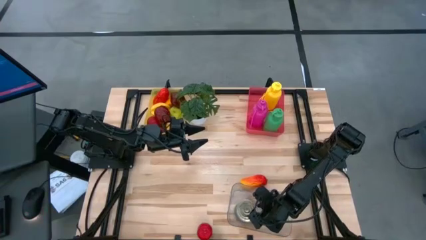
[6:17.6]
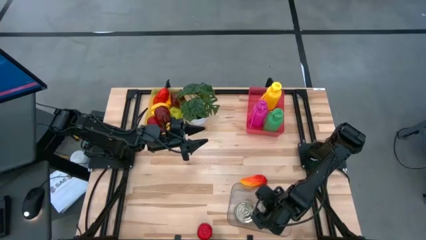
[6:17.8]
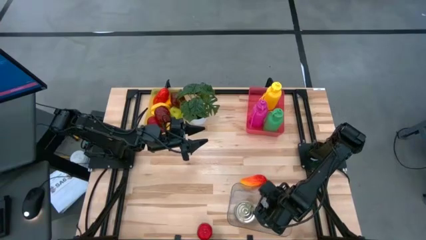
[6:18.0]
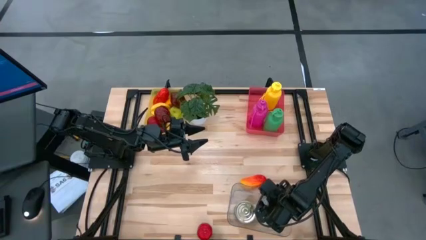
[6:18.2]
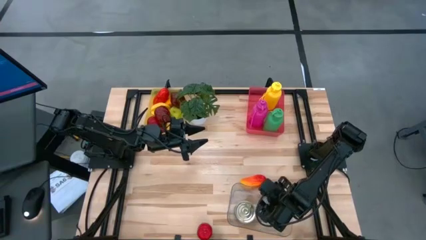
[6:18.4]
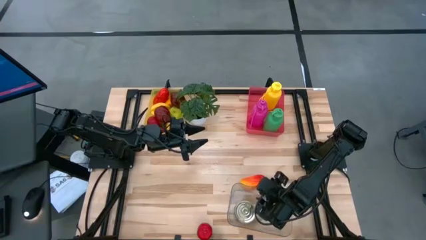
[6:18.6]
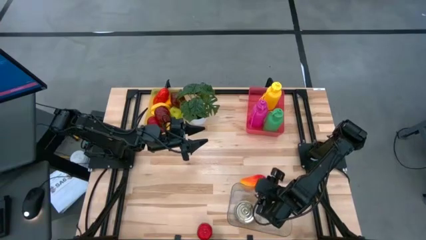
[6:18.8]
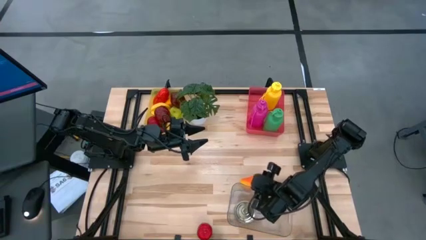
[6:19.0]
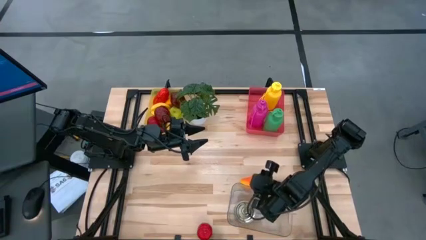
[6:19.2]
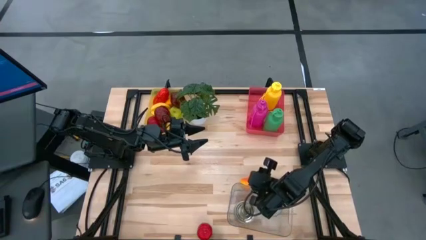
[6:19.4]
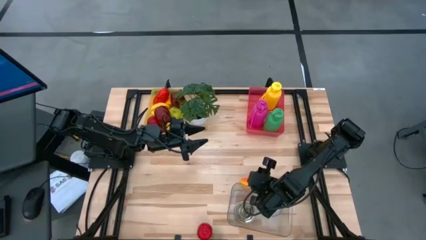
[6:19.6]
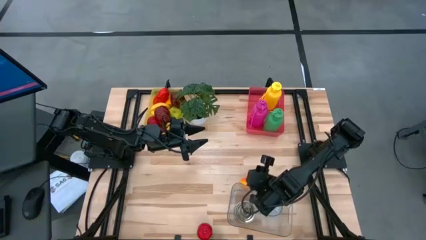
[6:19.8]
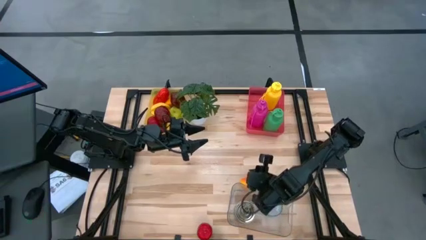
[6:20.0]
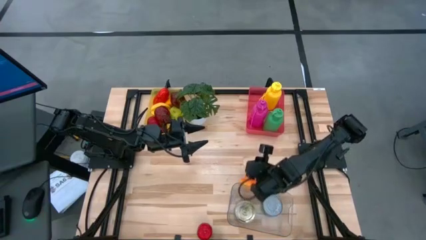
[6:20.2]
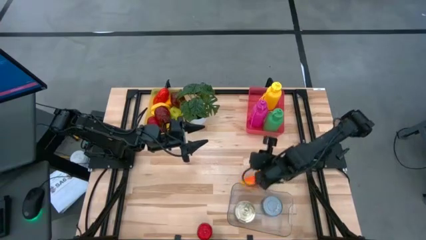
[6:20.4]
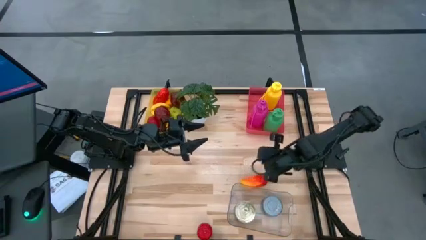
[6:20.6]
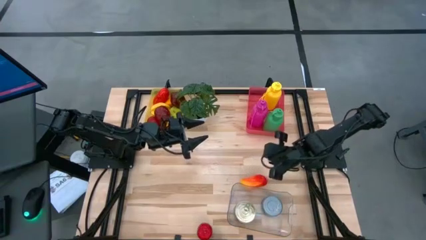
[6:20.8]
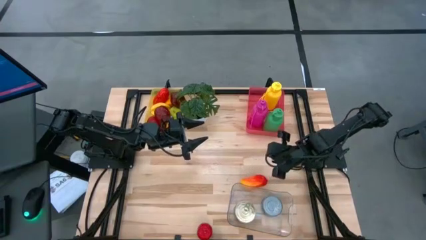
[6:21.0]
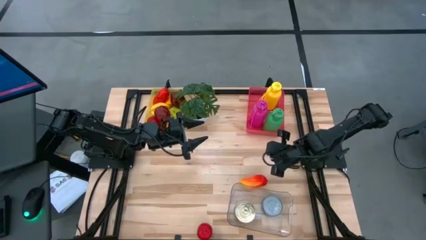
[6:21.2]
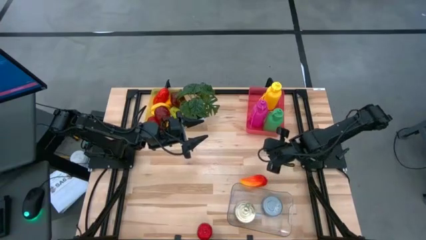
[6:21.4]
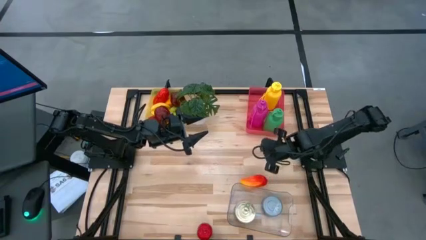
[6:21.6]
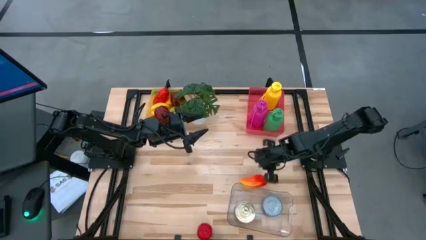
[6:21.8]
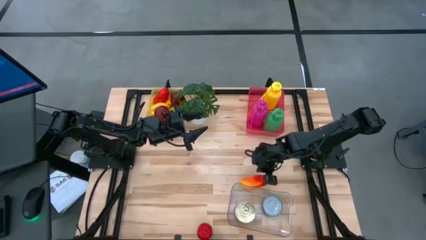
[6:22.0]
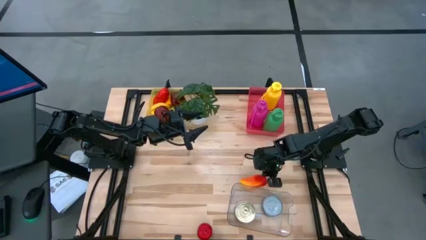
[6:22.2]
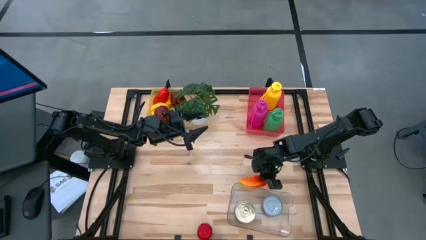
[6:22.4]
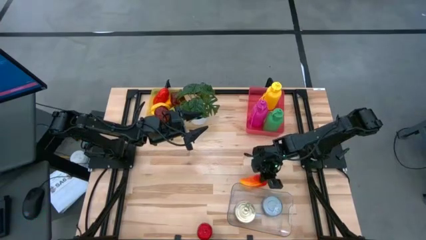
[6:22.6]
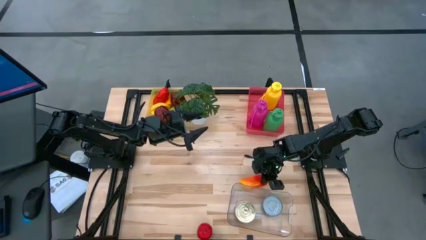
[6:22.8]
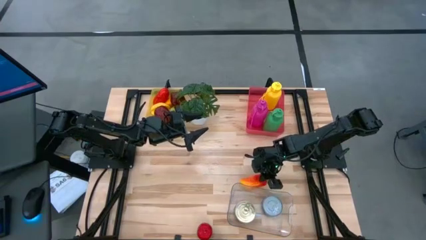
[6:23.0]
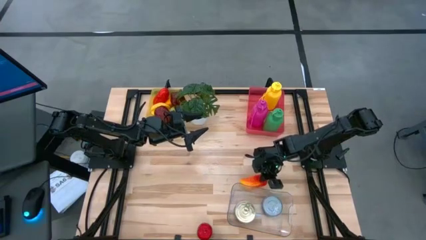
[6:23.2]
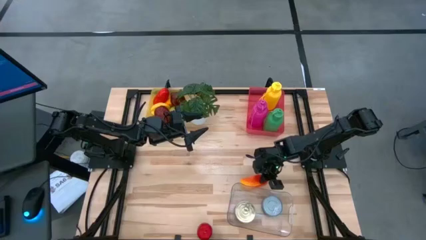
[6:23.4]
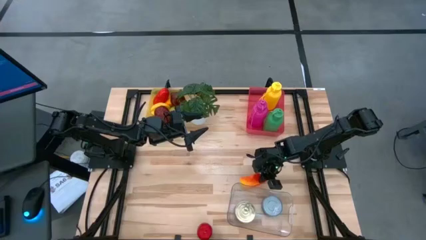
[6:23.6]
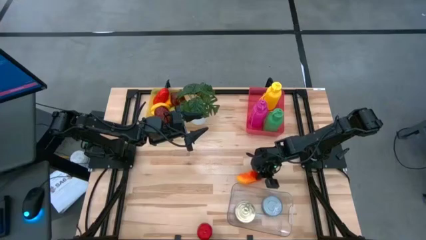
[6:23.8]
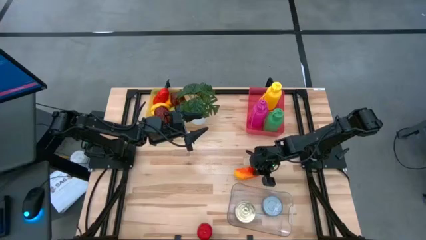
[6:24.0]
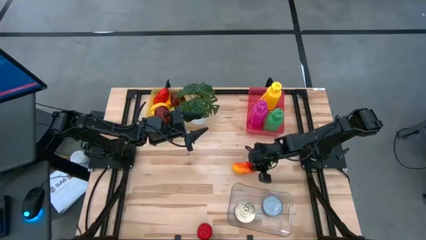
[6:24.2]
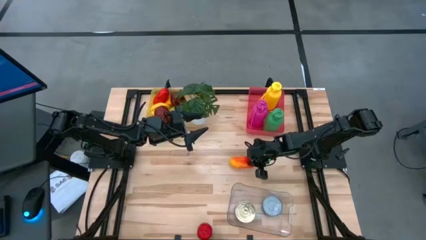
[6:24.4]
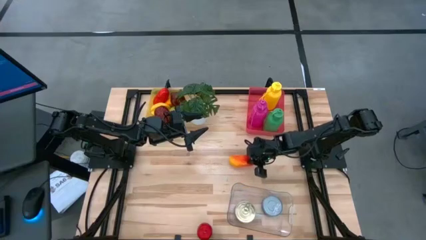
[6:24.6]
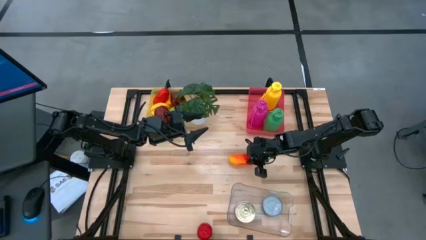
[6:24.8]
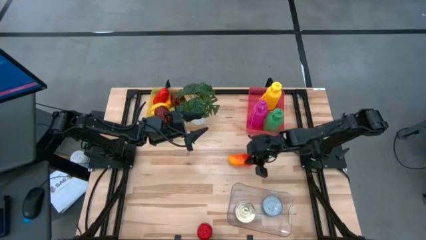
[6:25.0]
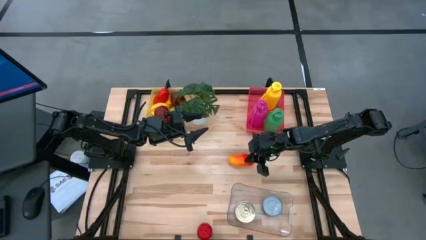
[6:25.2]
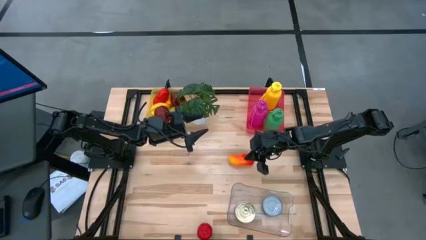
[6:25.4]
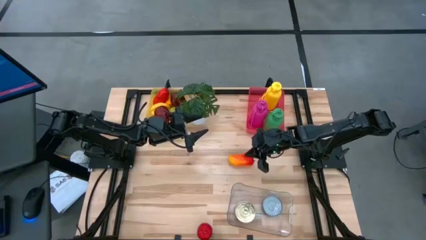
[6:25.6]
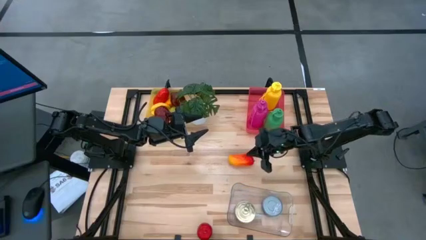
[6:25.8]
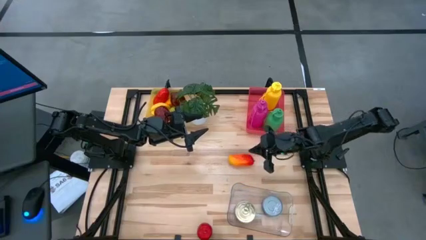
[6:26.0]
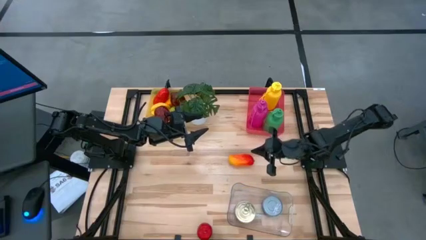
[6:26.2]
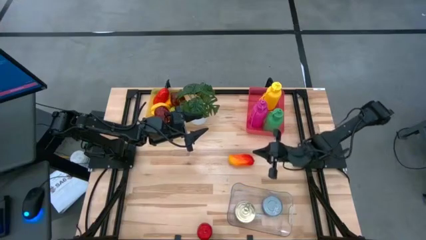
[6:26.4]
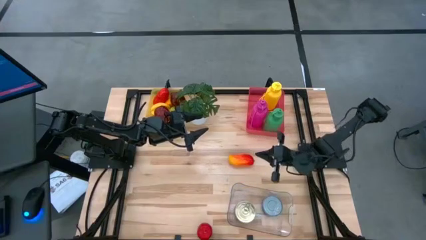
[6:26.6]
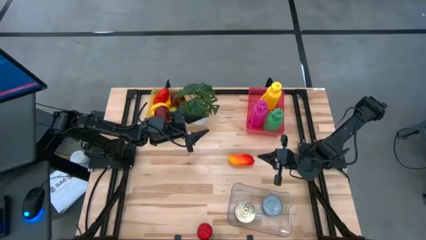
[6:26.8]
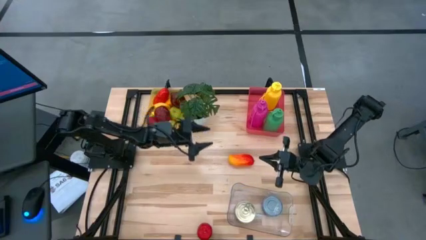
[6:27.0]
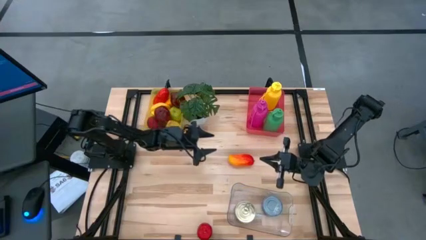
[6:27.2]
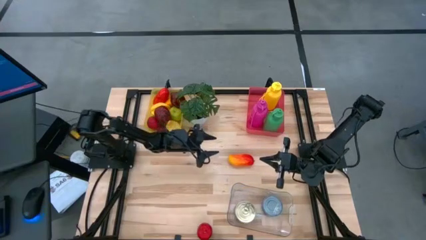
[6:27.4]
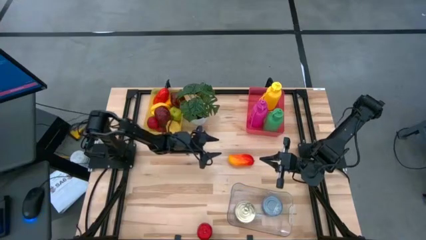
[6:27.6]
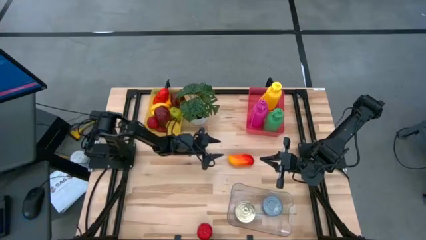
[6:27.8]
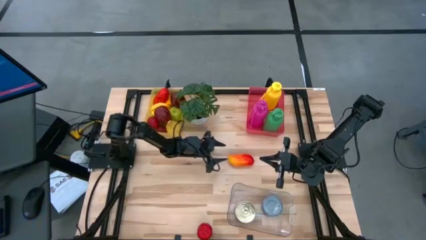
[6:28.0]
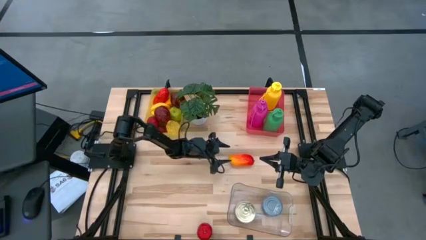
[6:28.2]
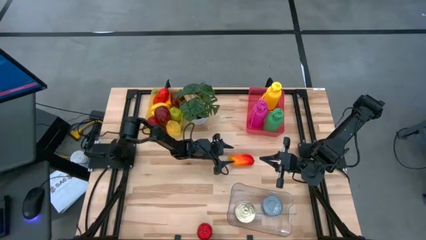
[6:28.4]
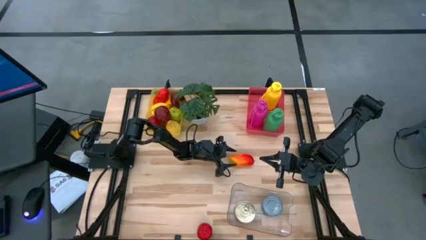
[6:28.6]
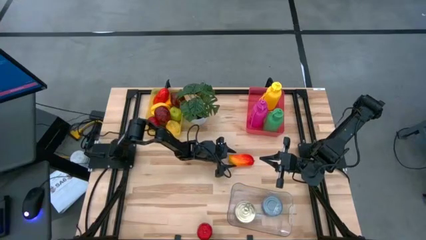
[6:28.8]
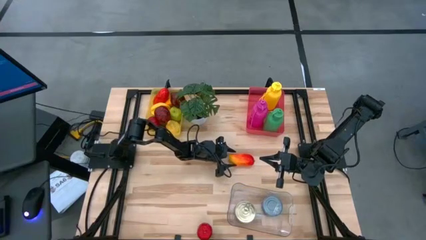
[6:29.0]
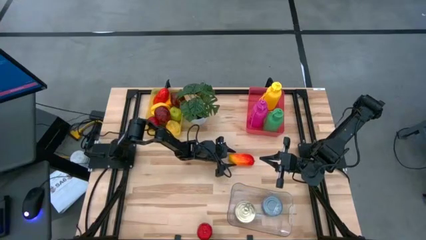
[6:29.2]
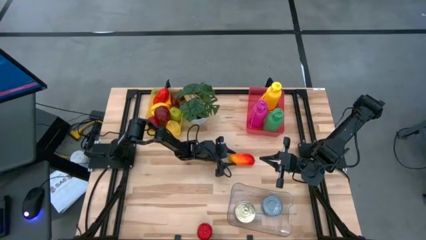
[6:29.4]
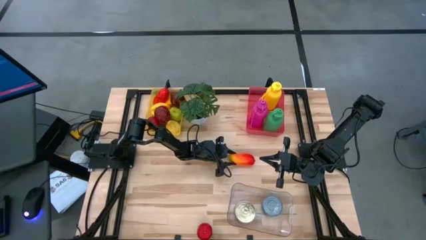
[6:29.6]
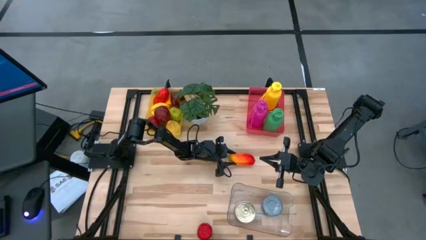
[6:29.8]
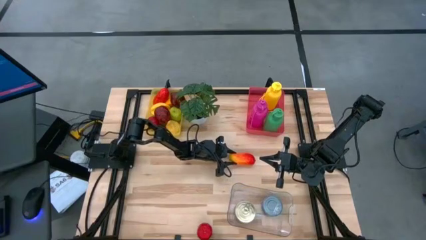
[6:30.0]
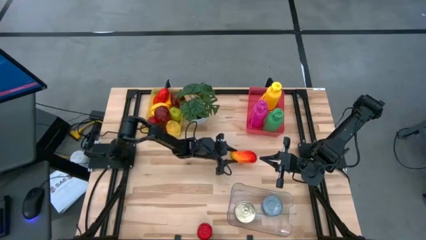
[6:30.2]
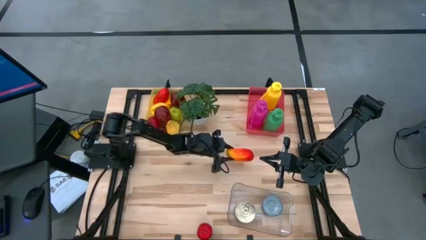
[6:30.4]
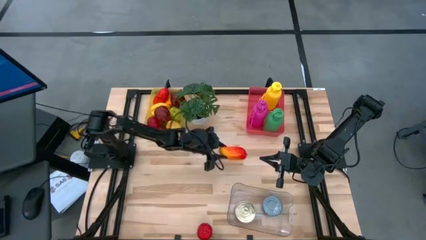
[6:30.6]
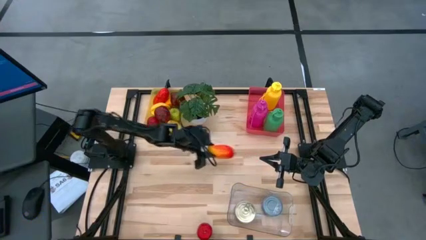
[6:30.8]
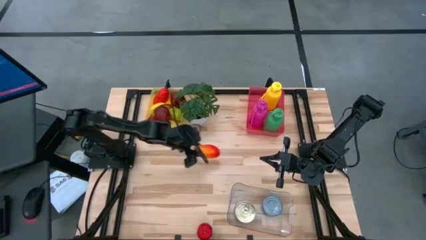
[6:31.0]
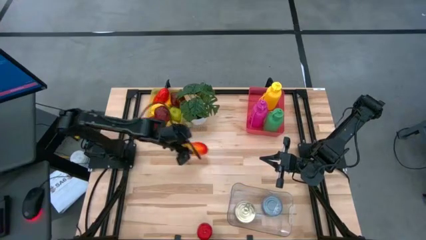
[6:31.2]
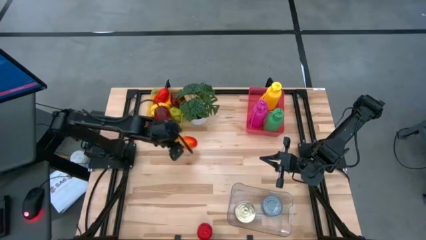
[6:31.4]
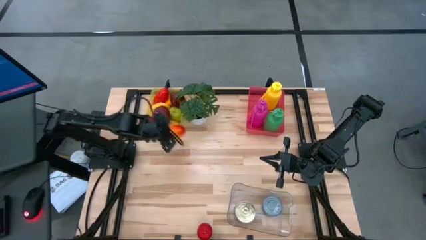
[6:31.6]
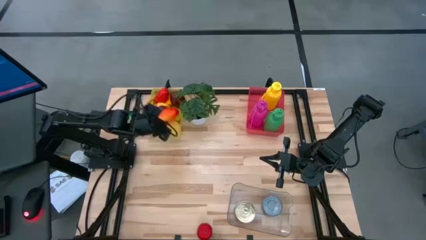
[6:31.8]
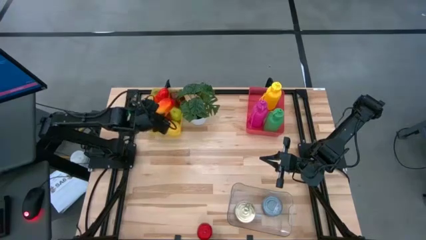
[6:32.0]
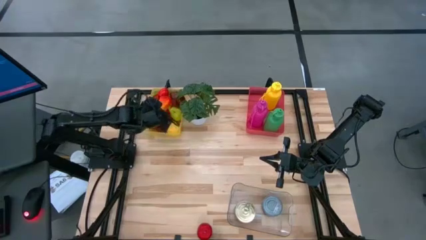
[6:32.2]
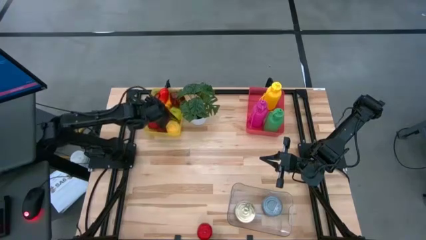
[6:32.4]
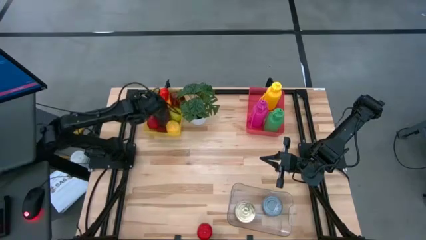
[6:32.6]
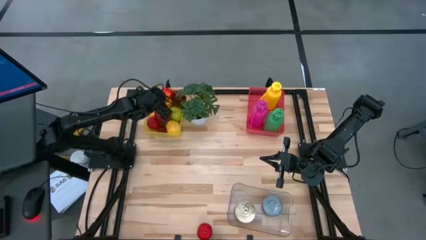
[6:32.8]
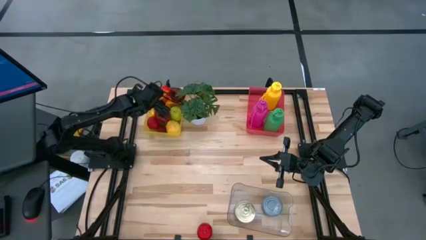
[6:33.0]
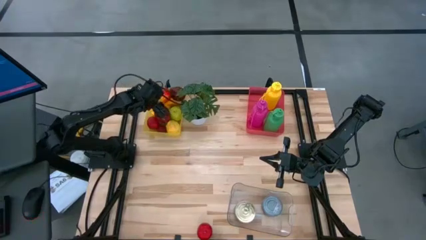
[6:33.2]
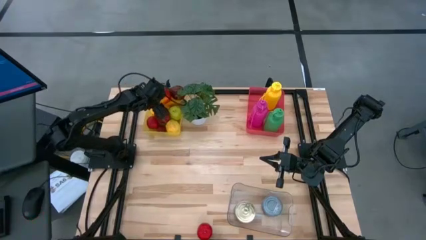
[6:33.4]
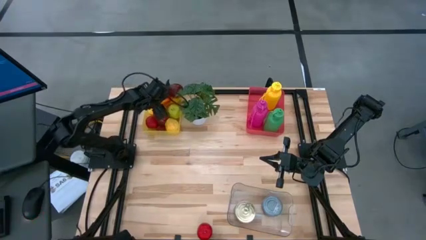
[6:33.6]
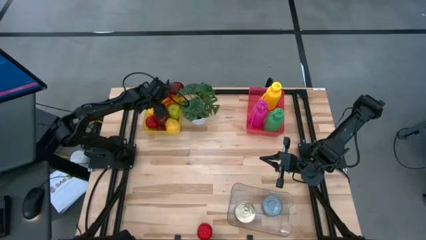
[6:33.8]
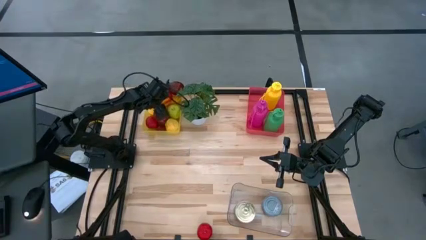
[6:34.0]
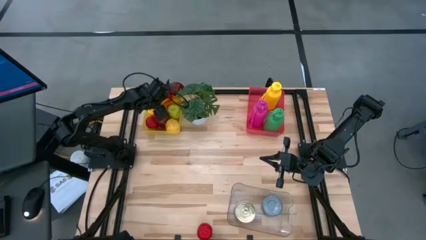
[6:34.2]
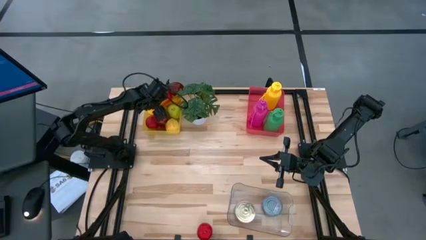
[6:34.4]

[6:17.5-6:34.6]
Task: Pick & Place Food Item
Put the orange mango into the yellow bin
